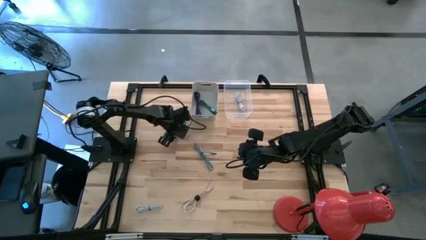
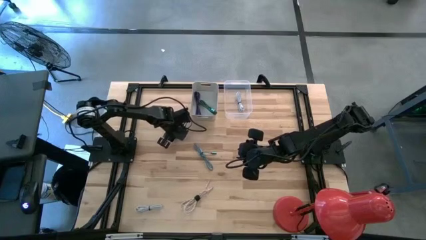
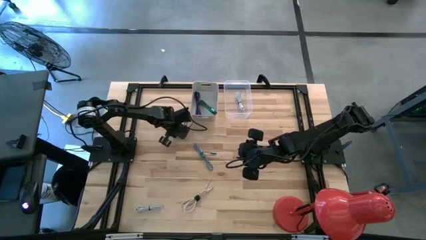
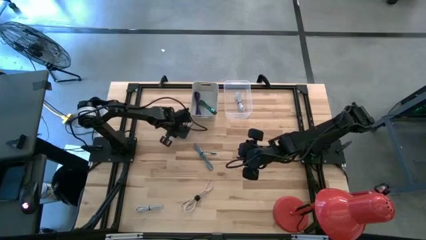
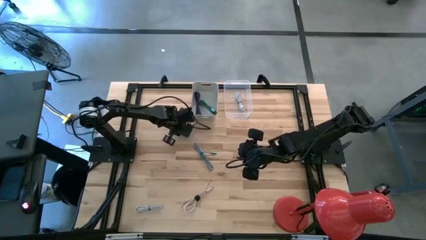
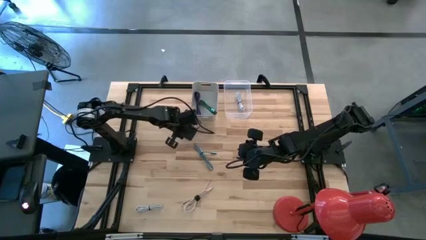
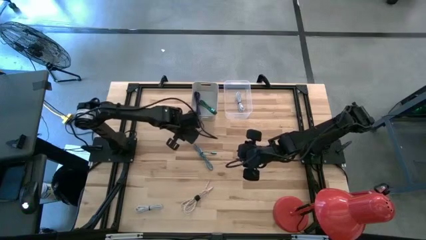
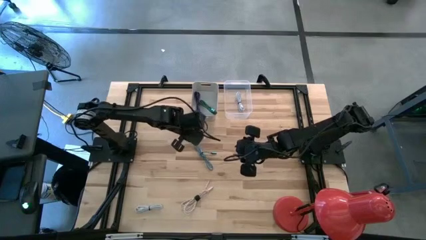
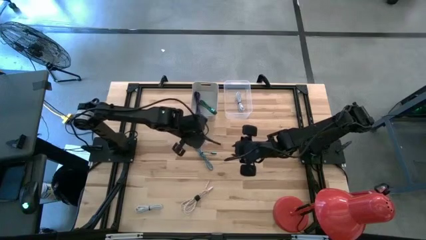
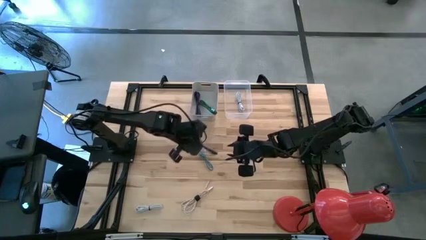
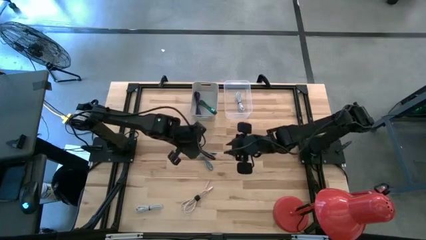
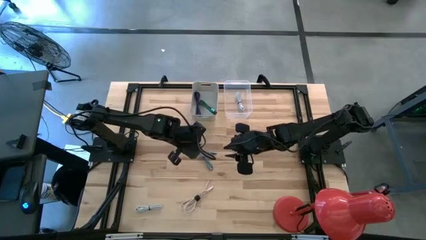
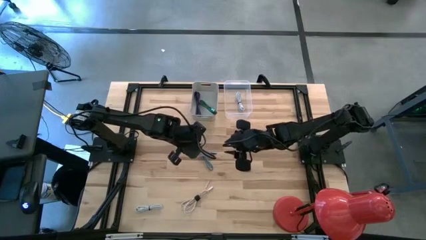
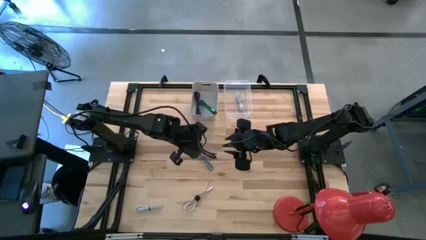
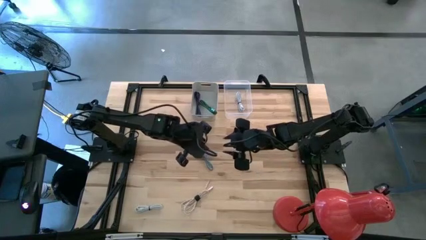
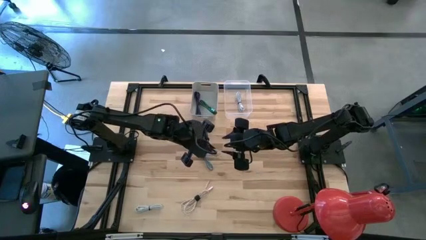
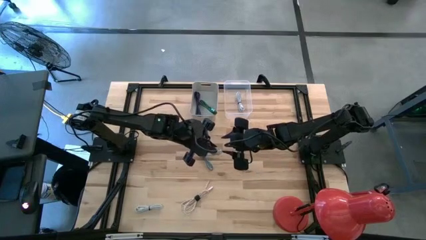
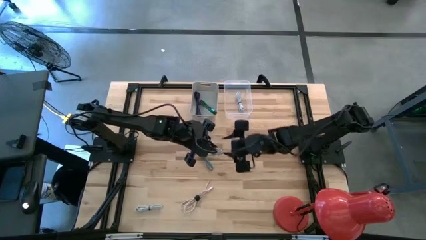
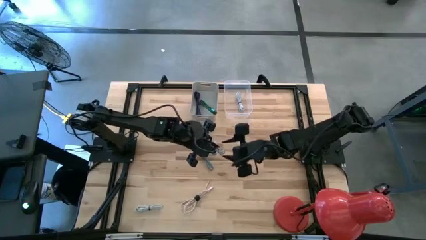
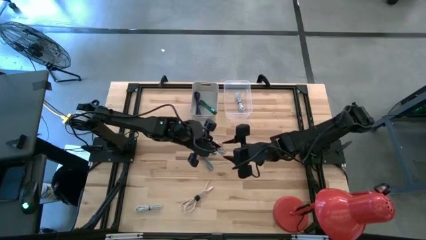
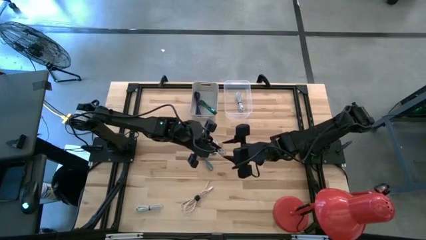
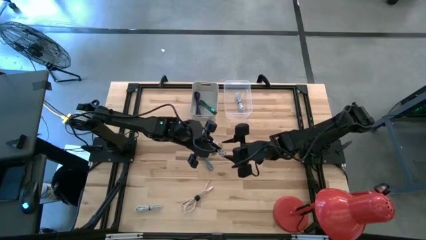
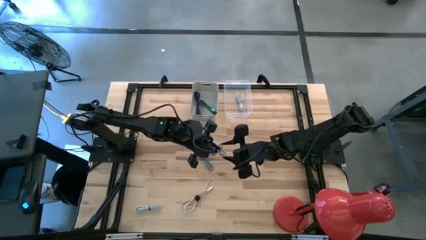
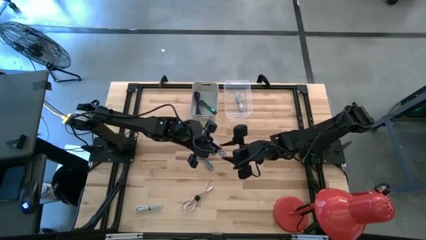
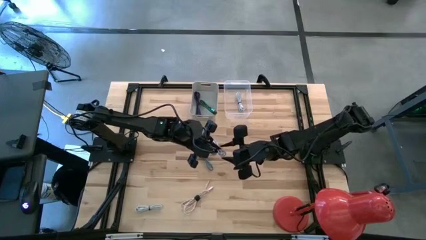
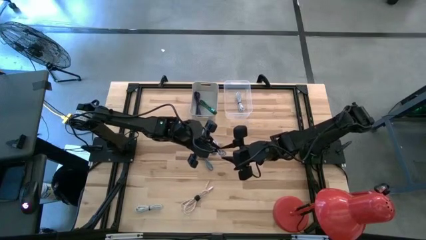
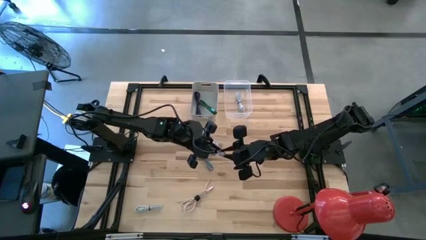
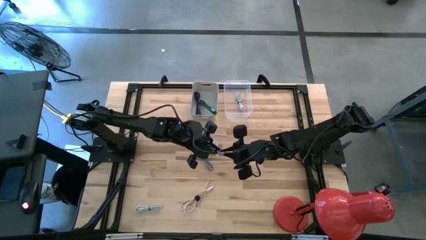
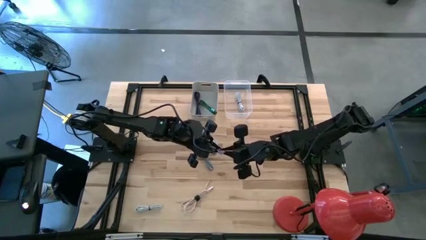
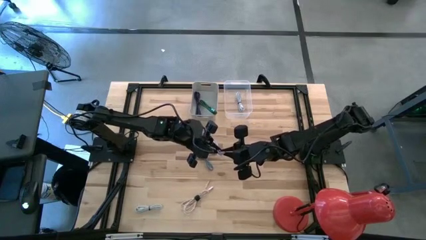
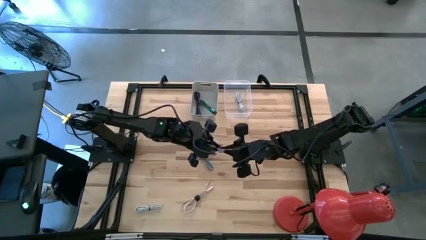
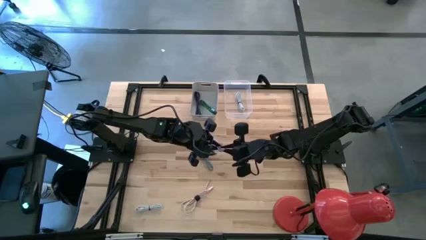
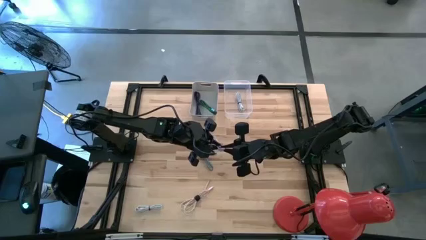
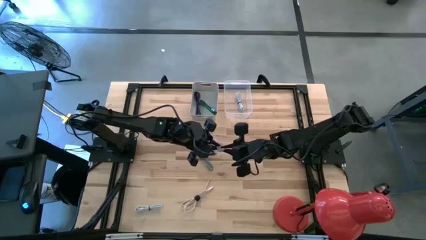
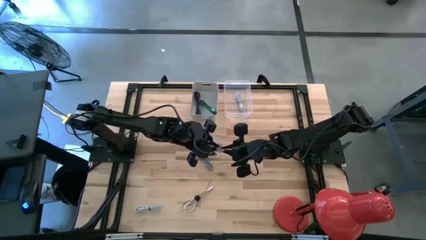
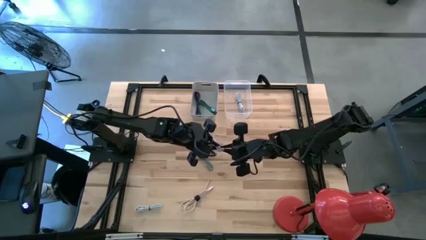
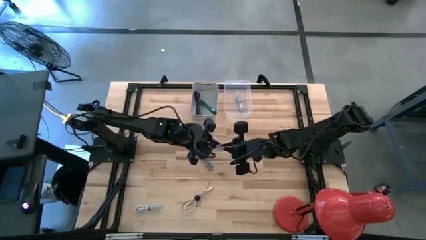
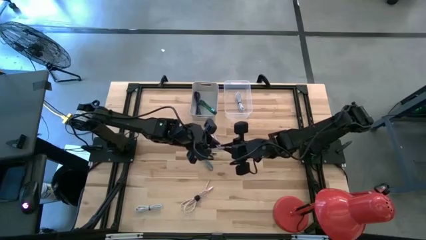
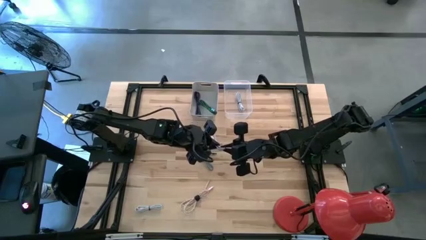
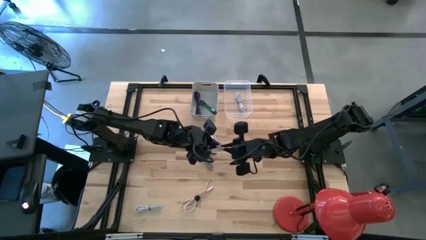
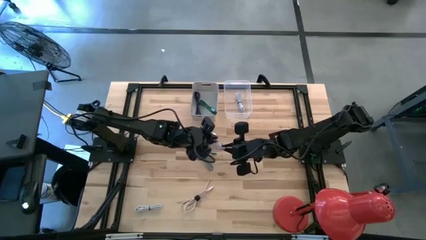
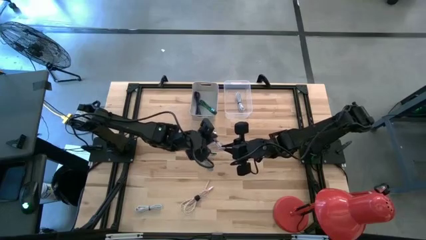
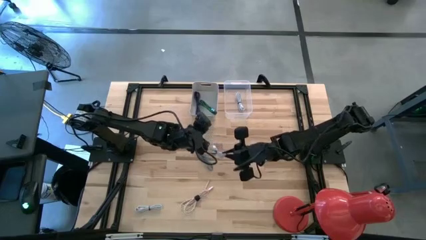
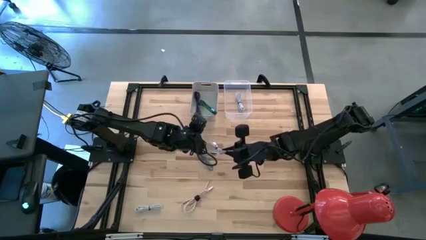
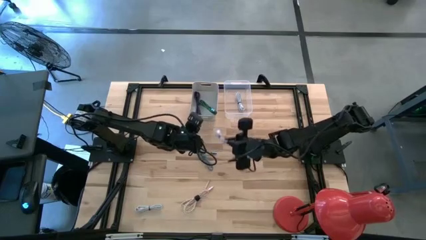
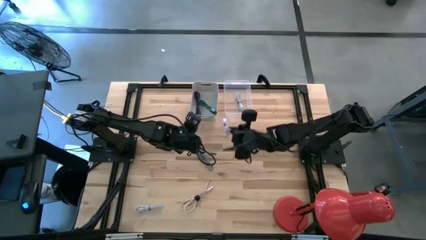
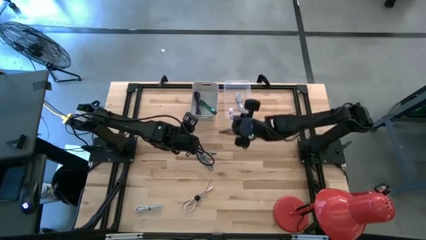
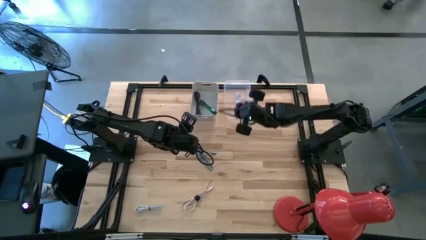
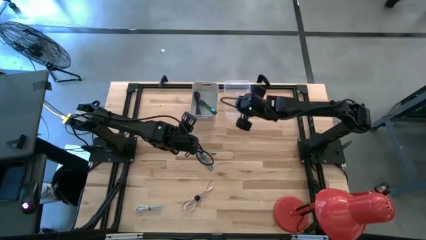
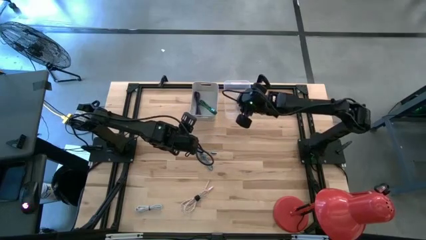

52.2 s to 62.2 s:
Task: Pick & Place USB Port
Put the purple charger cable into the transparent bin
